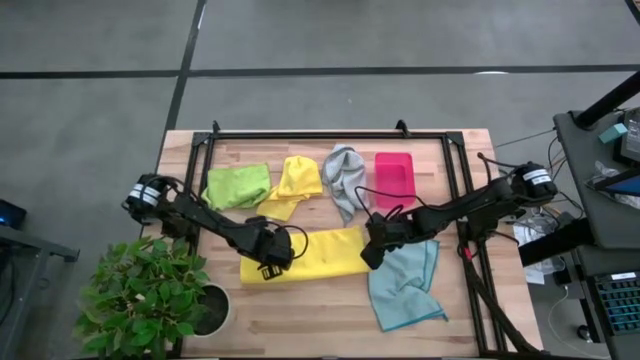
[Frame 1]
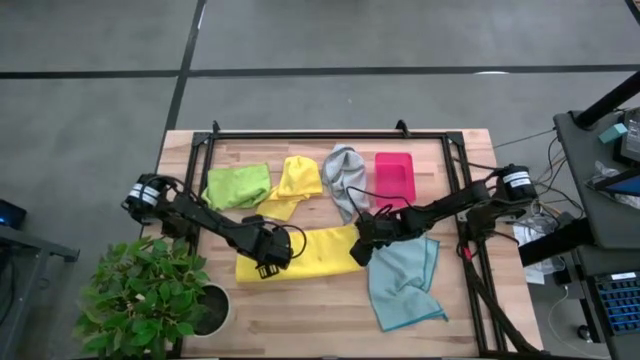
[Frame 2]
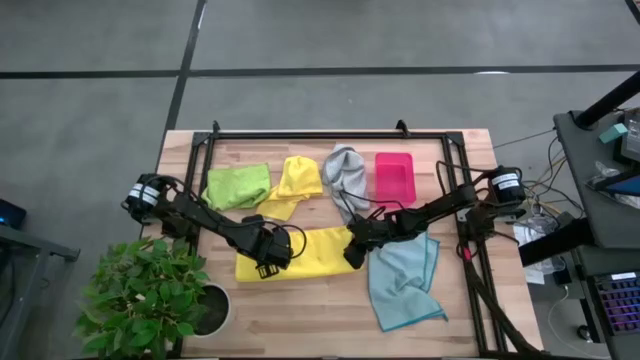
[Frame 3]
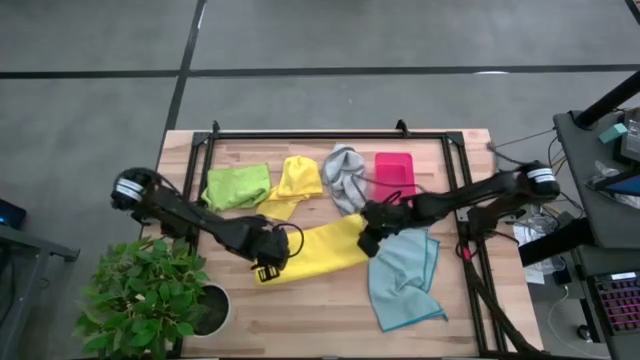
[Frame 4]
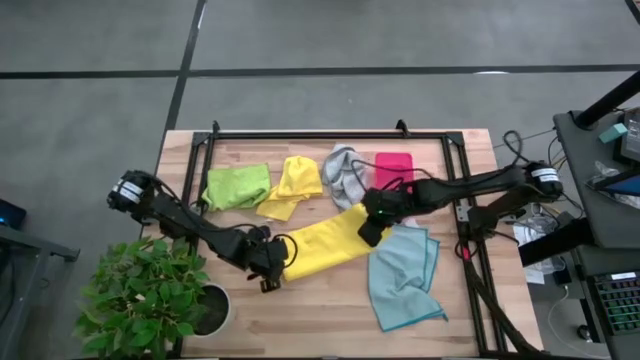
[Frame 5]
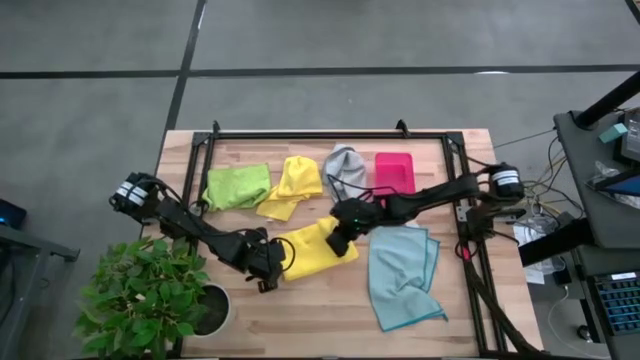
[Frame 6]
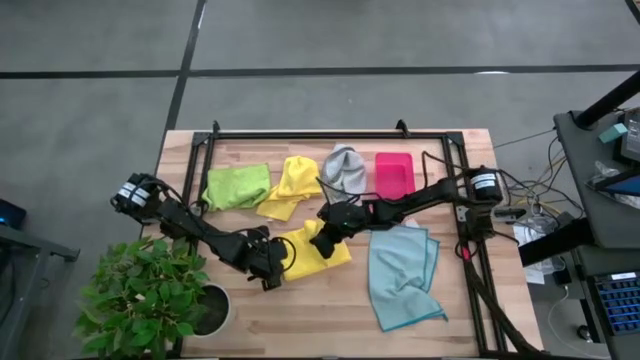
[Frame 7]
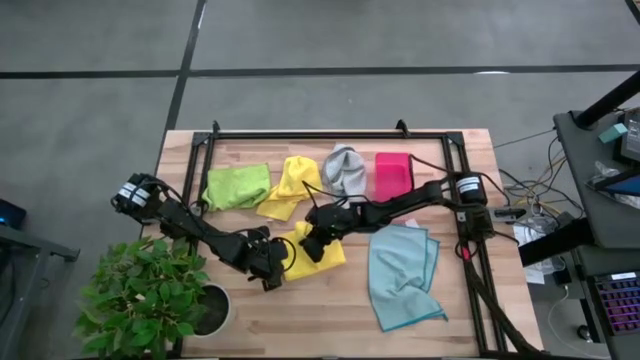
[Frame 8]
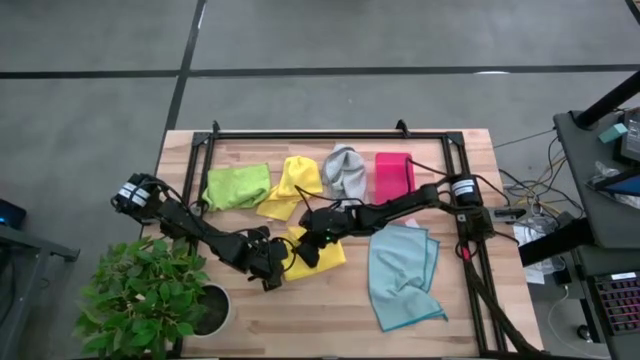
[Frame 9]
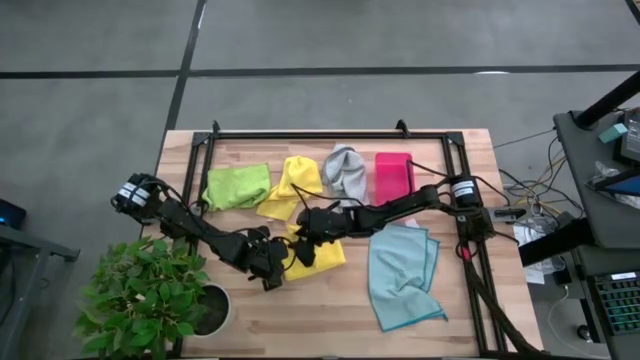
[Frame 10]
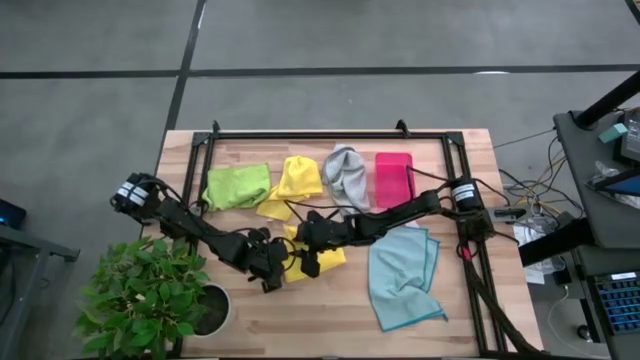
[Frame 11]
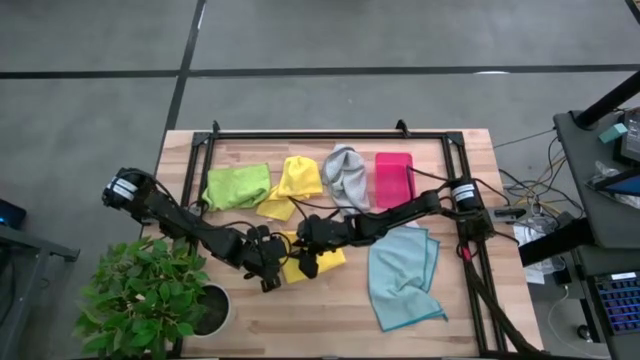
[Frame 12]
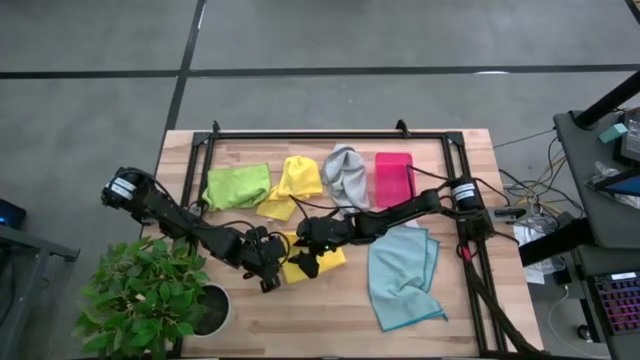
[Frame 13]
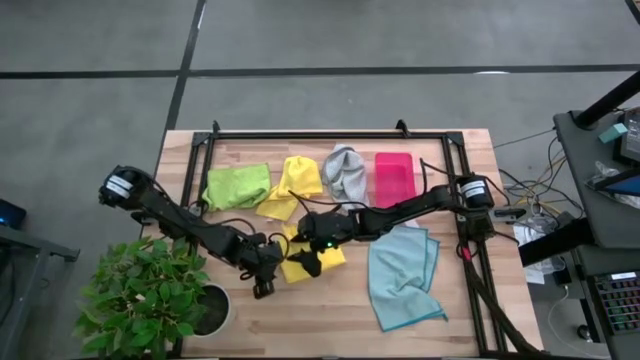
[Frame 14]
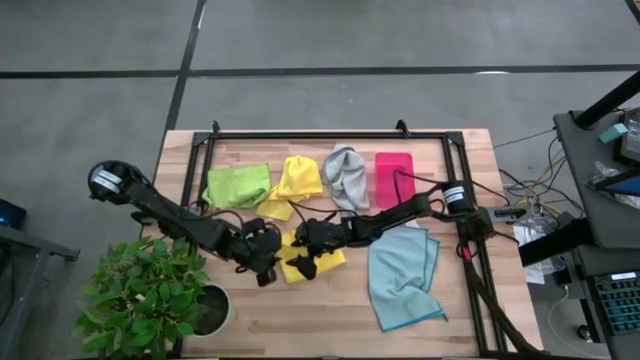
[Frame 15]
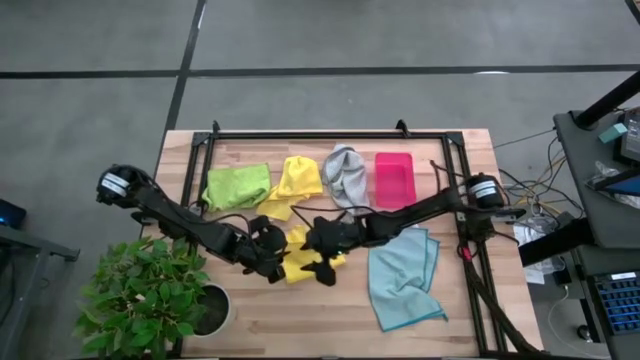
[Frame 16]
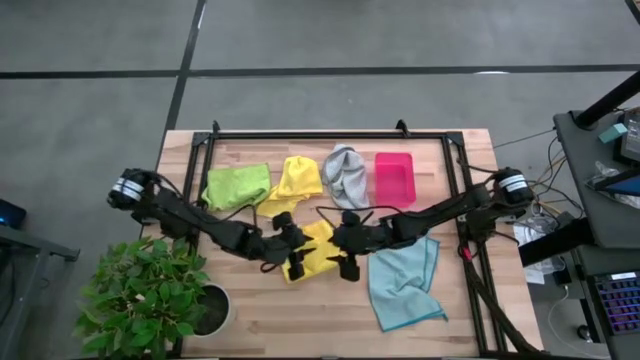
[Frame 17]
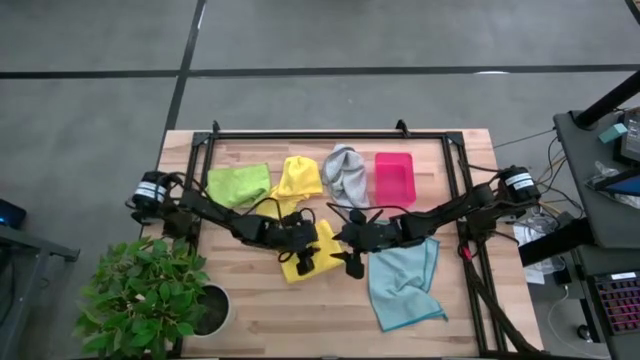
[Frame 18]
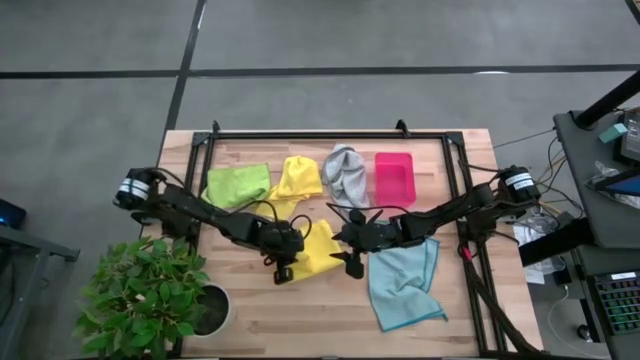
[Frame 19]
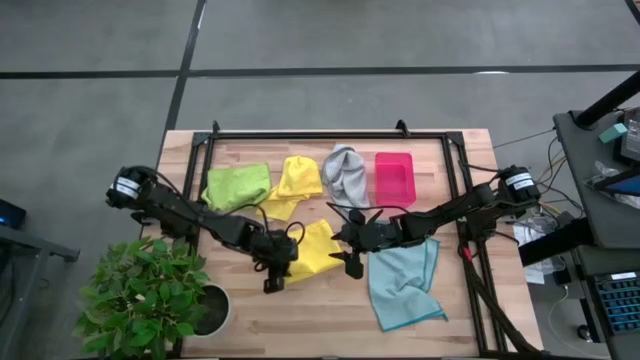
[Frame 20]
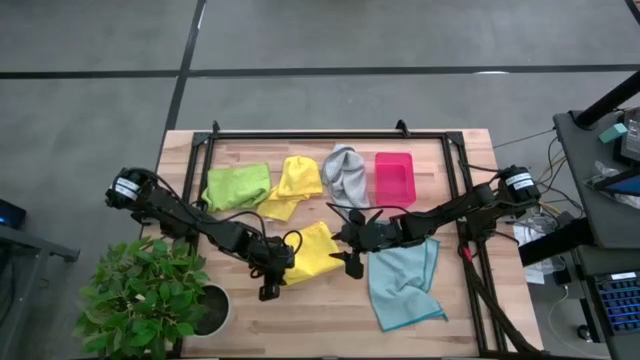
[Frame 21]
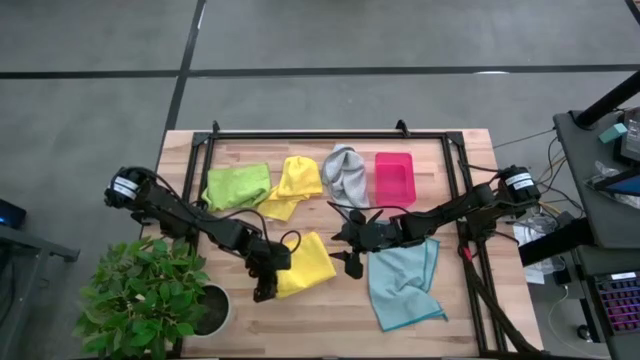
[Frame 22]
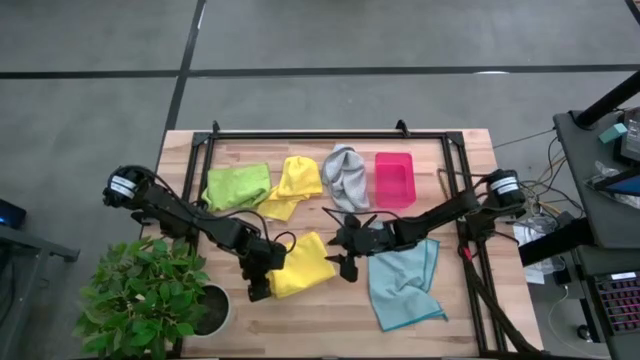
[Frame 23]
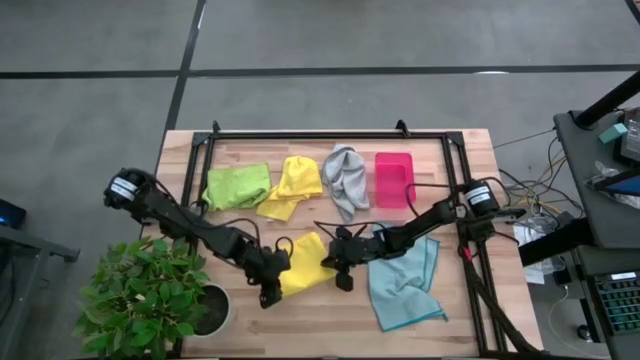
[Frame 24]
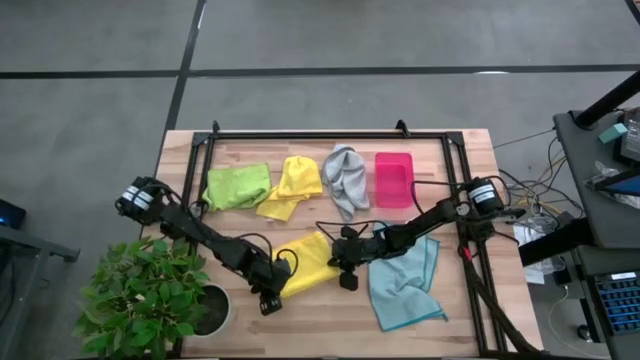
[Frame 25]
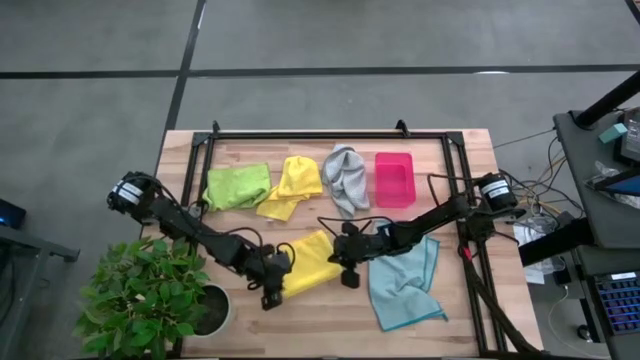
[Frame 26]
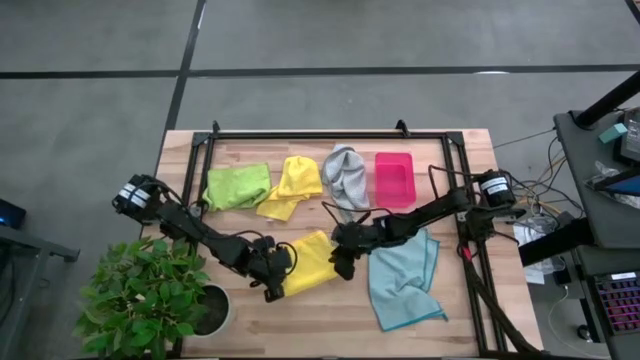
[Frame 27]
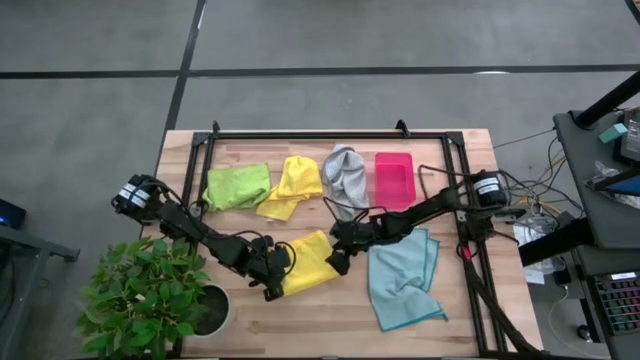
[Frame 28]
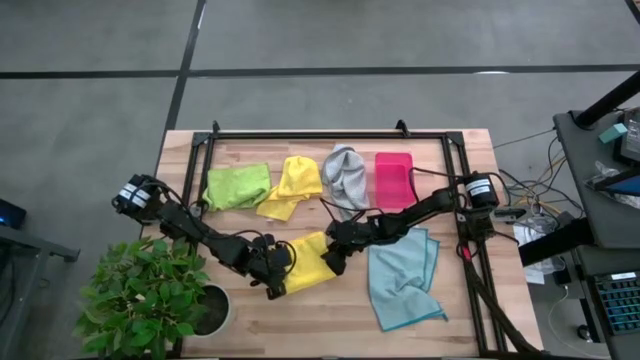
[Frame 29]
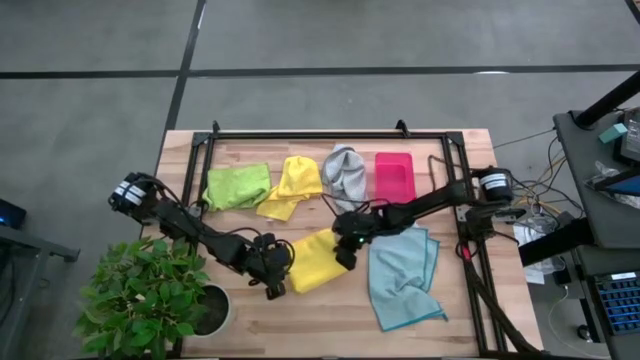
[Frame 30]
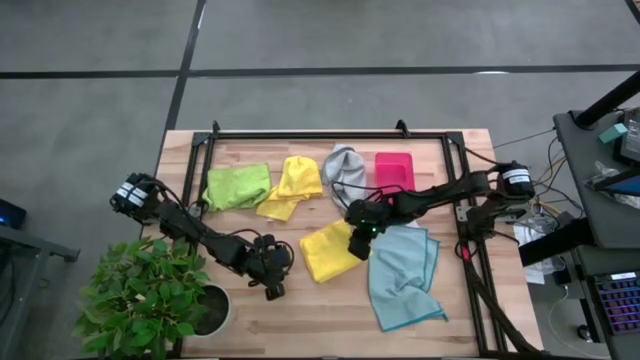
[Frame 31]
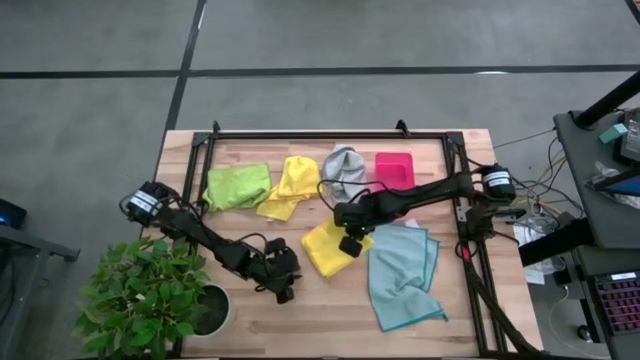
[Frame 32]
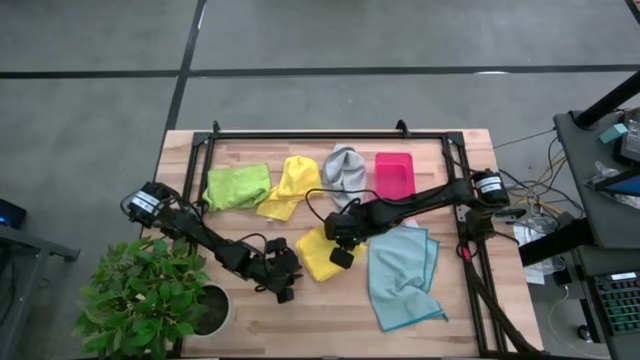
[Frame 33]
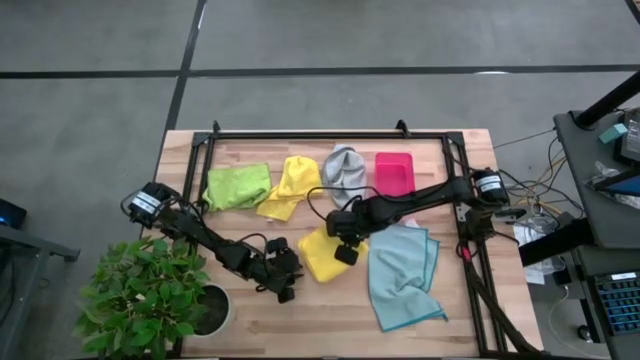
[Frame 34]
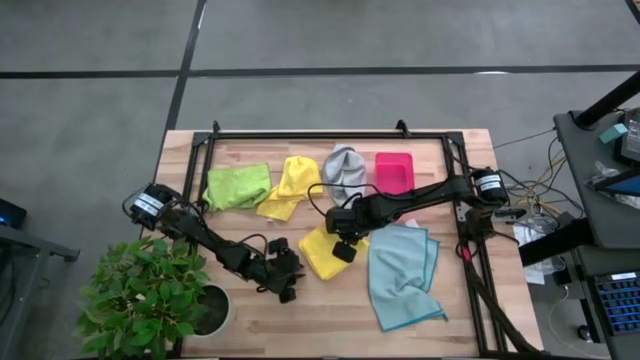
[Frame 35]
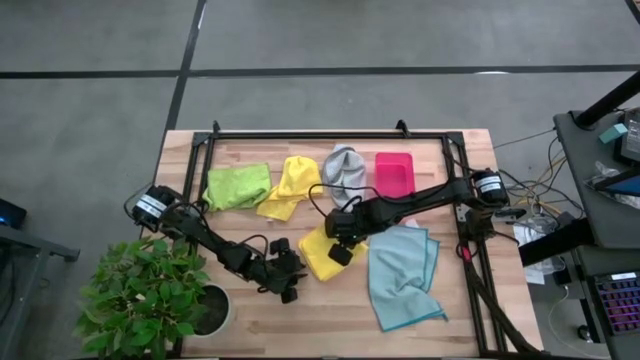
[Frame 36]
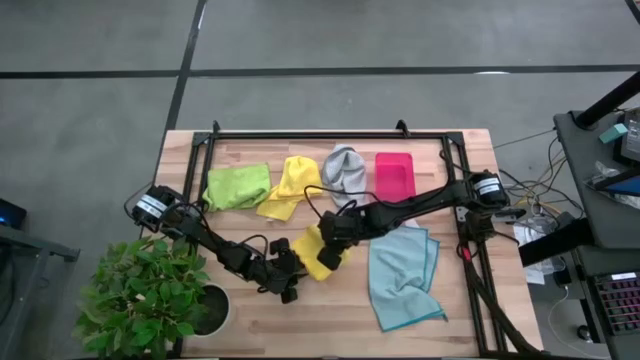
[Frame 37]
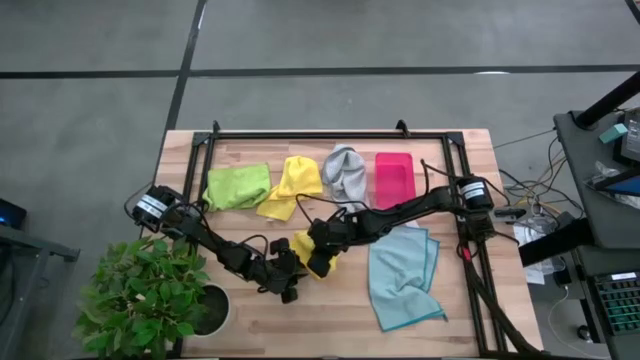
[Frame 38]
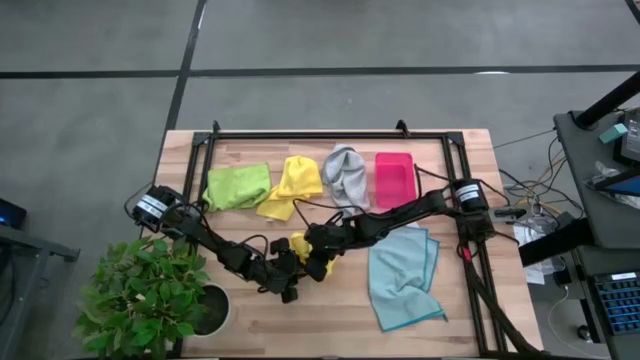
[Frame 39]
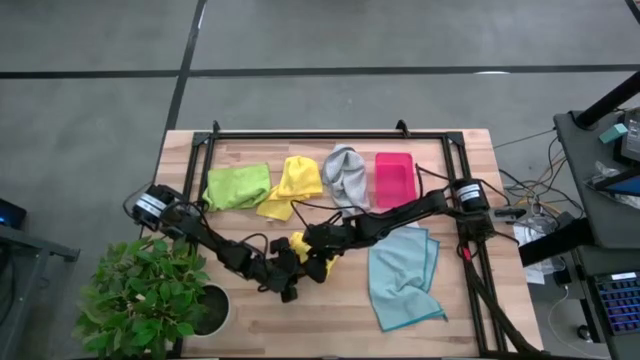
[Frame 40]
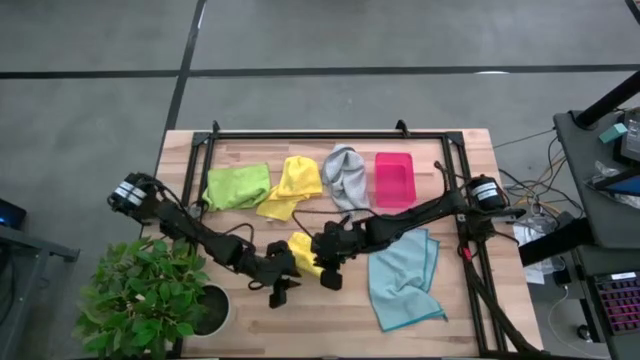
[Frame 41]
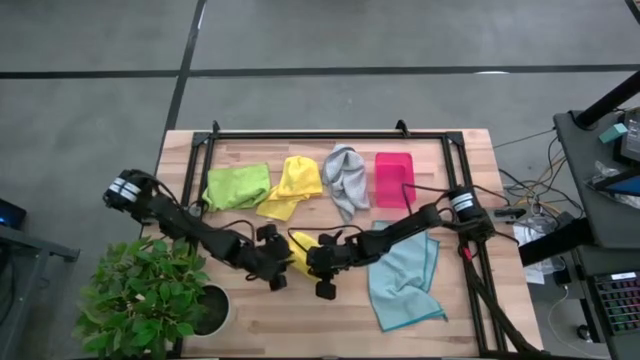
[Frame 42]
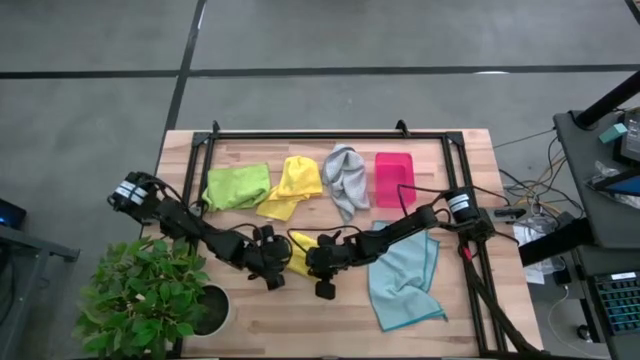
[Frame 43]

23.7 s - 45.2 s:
Task: Fold microfiber towels
Fold the bottom yellow microfiber towel
